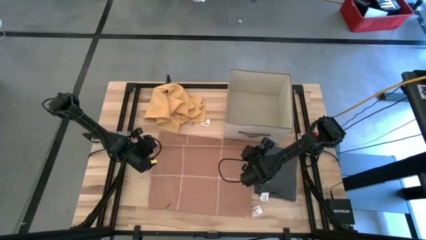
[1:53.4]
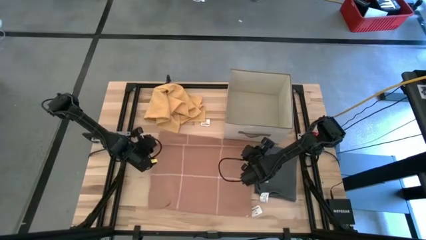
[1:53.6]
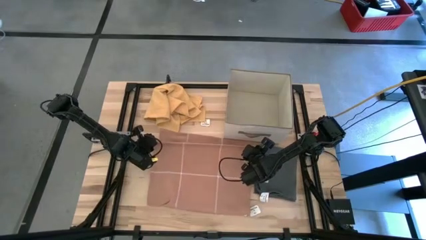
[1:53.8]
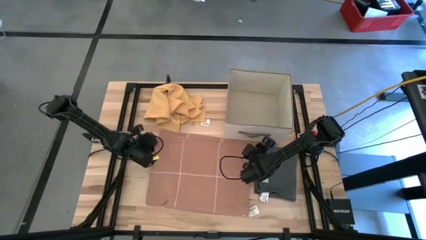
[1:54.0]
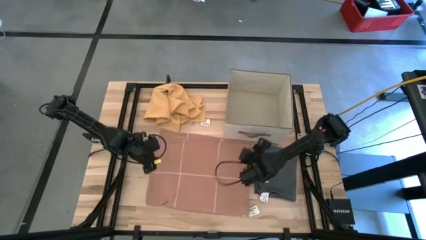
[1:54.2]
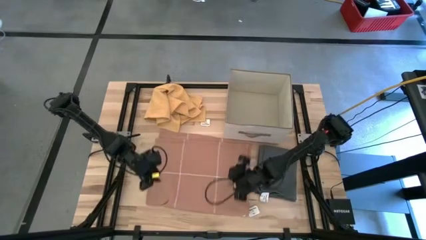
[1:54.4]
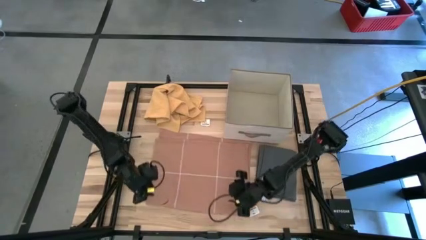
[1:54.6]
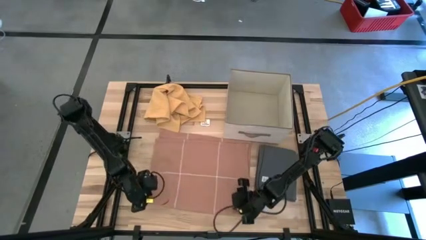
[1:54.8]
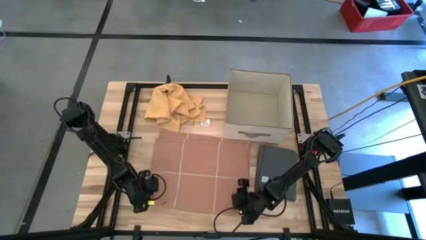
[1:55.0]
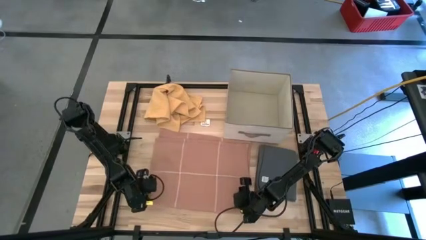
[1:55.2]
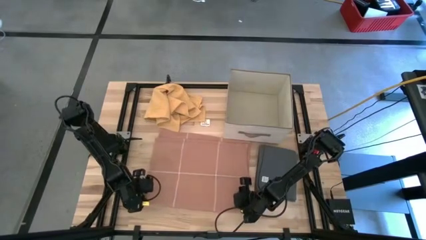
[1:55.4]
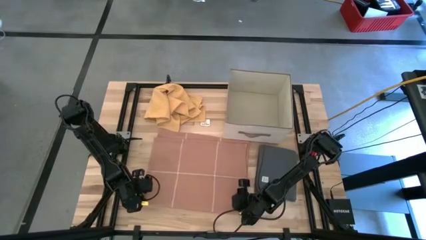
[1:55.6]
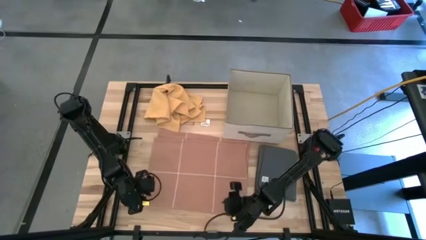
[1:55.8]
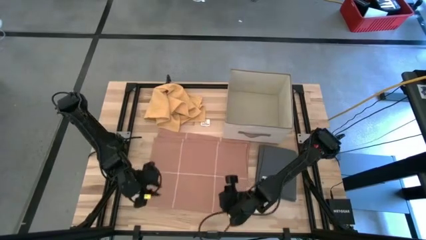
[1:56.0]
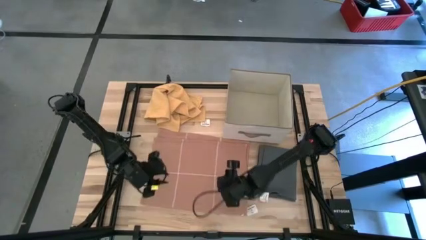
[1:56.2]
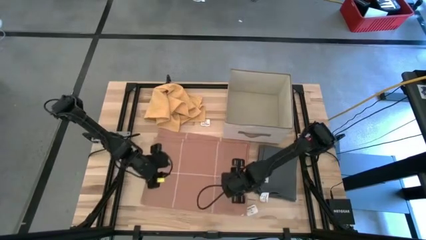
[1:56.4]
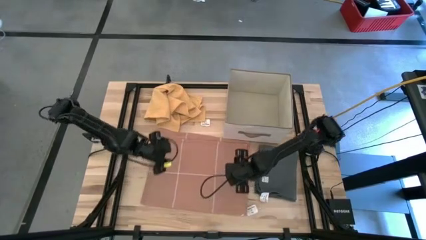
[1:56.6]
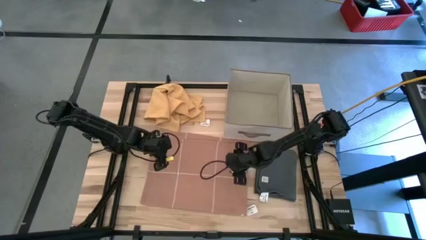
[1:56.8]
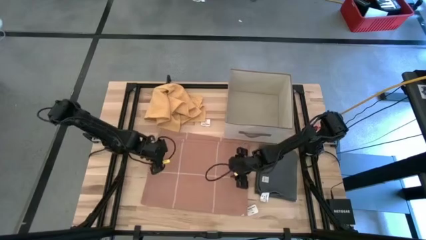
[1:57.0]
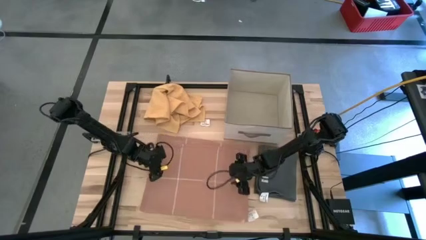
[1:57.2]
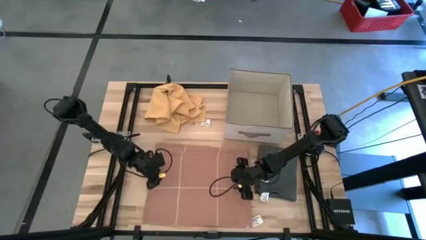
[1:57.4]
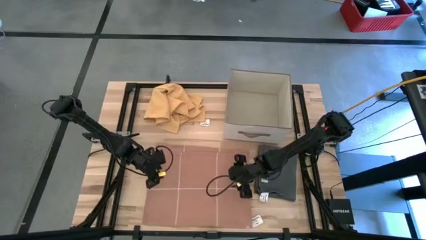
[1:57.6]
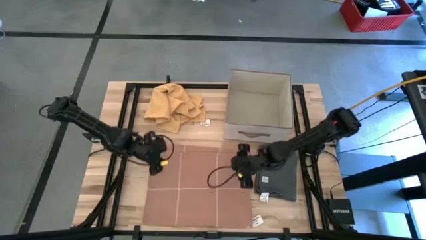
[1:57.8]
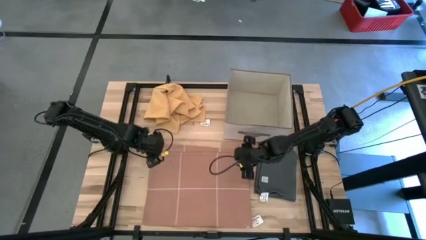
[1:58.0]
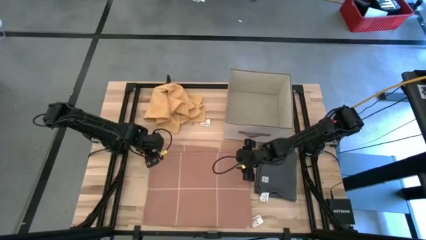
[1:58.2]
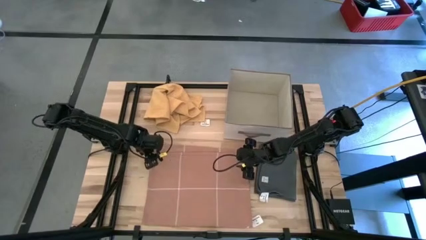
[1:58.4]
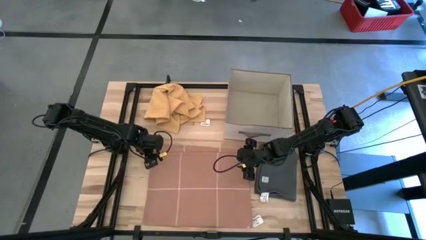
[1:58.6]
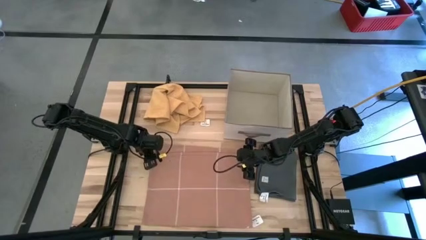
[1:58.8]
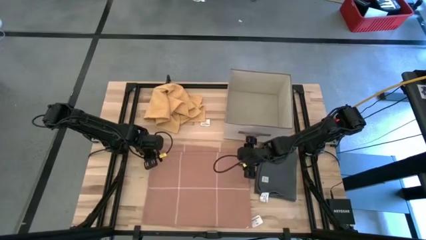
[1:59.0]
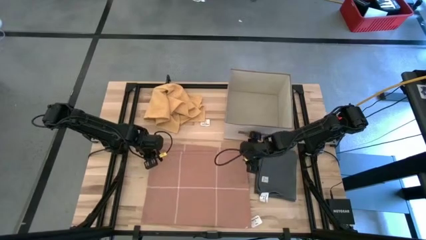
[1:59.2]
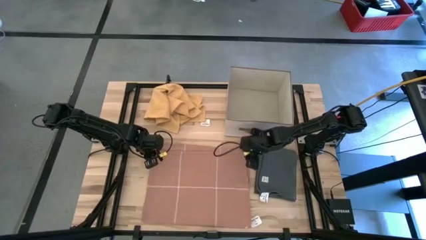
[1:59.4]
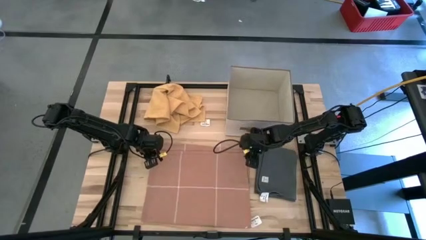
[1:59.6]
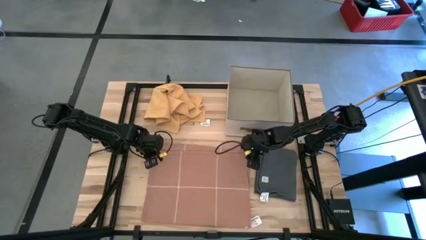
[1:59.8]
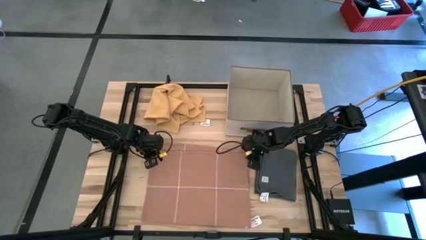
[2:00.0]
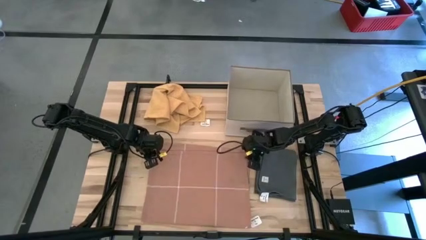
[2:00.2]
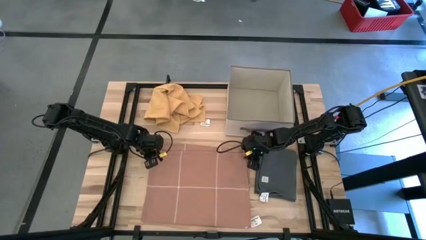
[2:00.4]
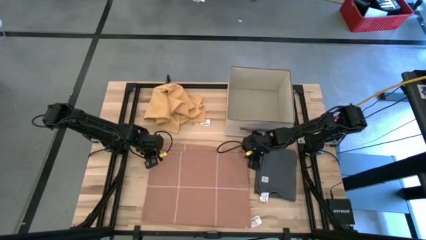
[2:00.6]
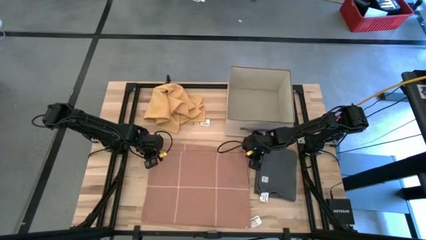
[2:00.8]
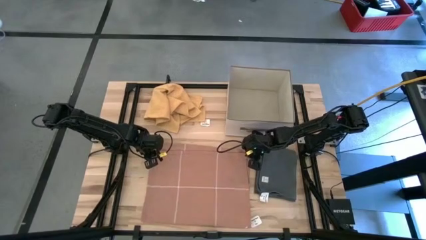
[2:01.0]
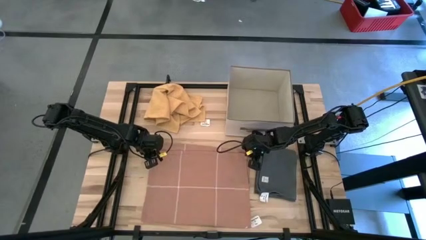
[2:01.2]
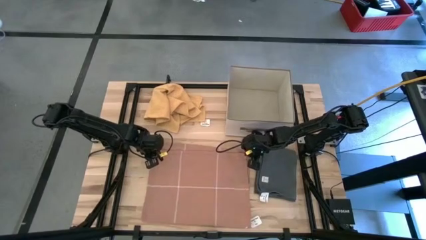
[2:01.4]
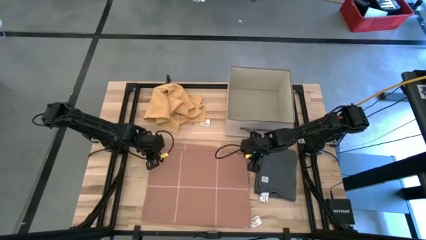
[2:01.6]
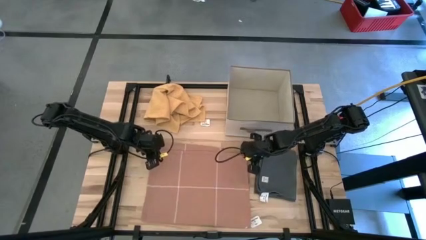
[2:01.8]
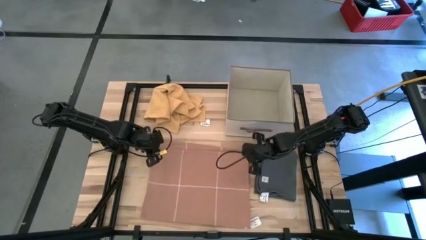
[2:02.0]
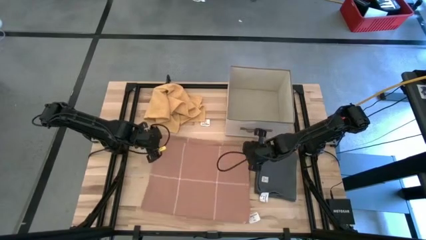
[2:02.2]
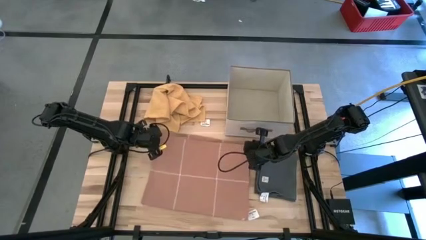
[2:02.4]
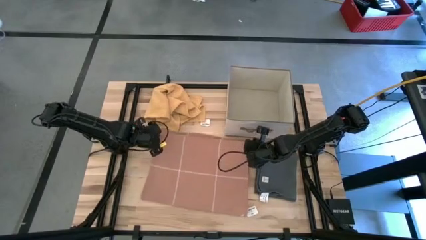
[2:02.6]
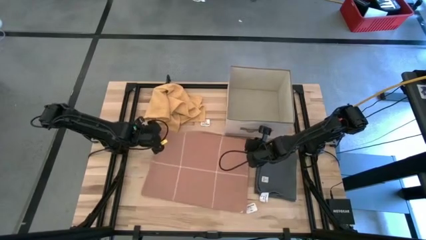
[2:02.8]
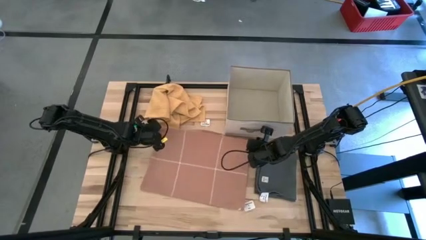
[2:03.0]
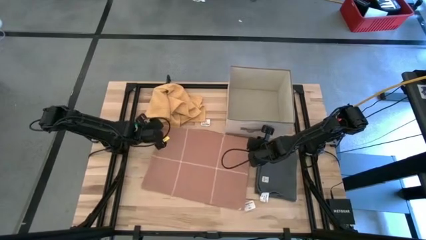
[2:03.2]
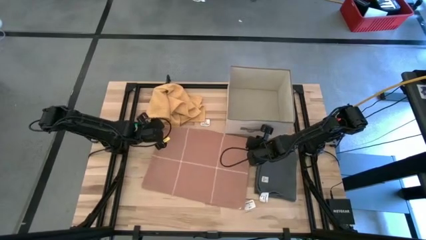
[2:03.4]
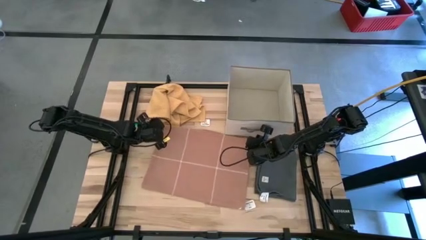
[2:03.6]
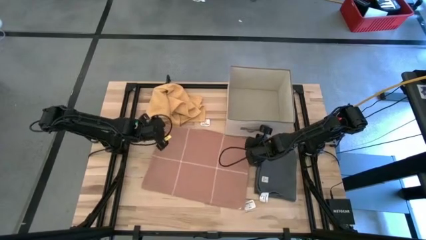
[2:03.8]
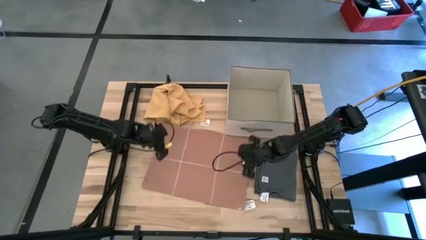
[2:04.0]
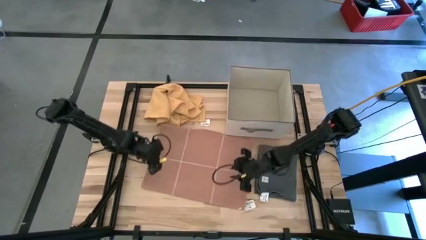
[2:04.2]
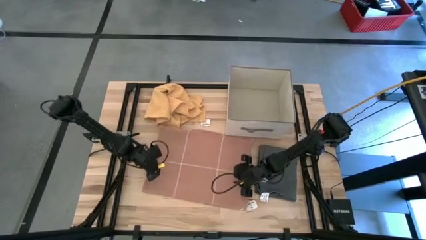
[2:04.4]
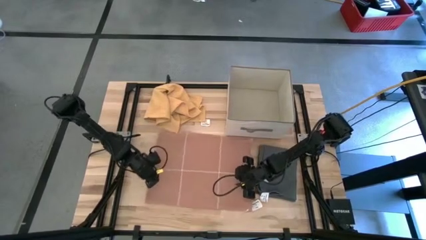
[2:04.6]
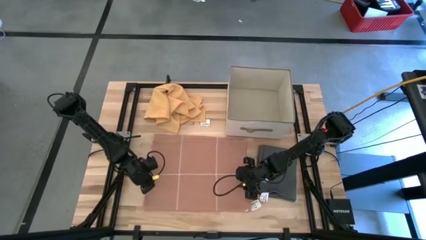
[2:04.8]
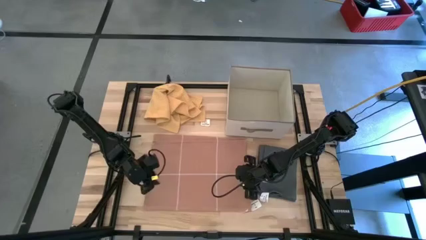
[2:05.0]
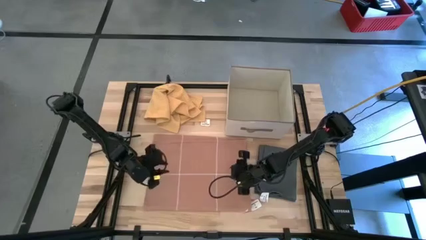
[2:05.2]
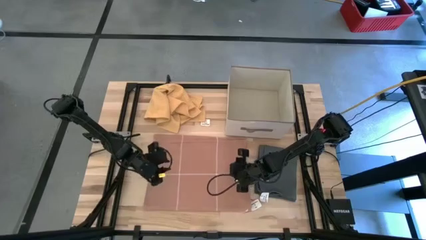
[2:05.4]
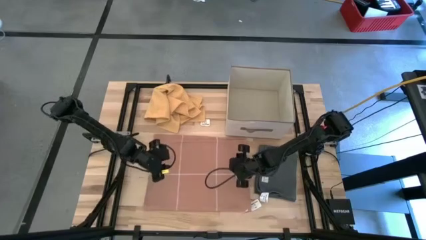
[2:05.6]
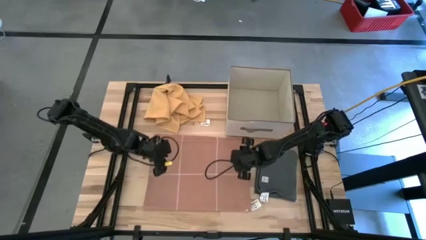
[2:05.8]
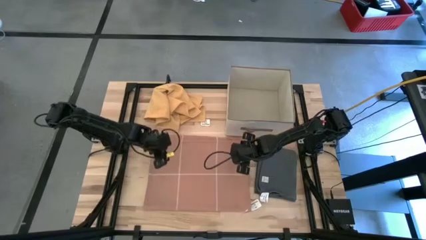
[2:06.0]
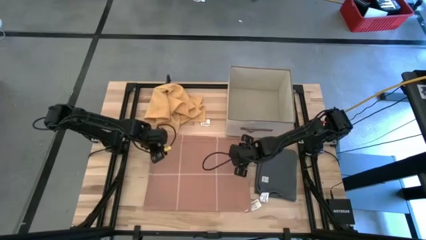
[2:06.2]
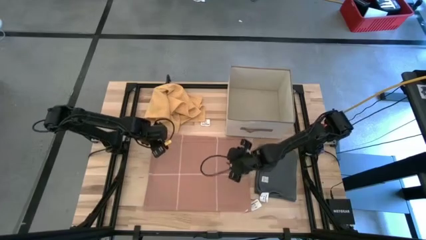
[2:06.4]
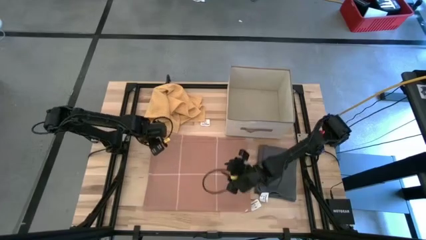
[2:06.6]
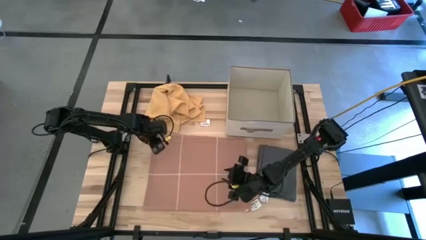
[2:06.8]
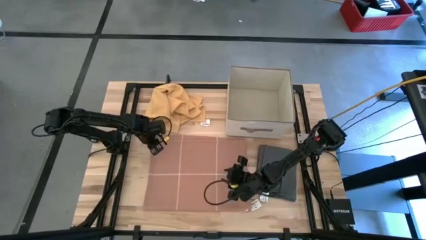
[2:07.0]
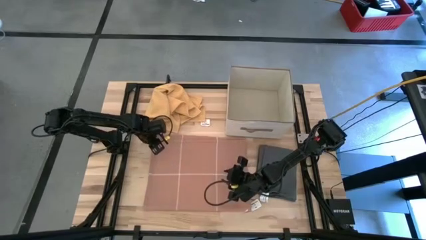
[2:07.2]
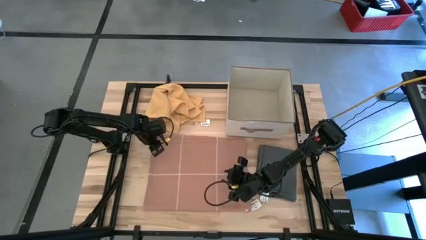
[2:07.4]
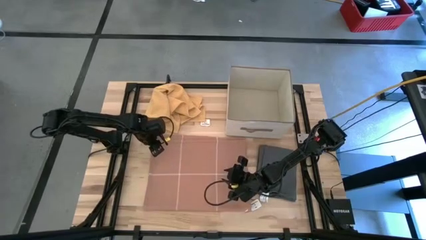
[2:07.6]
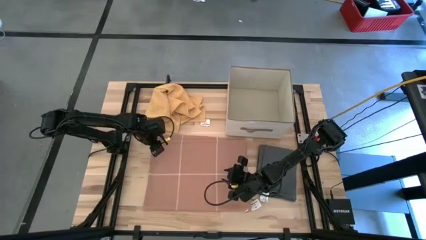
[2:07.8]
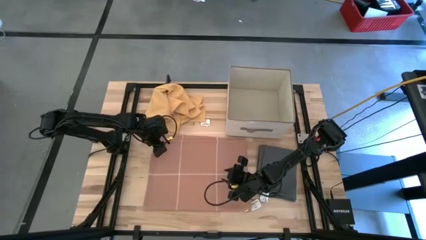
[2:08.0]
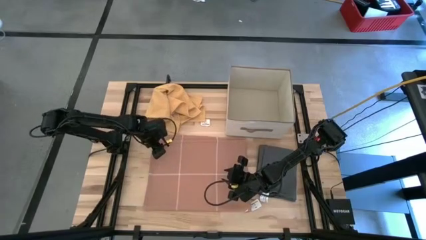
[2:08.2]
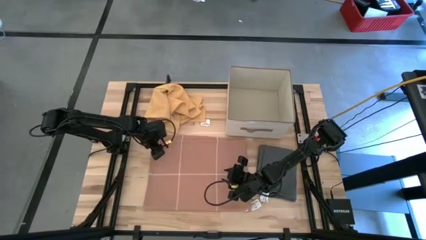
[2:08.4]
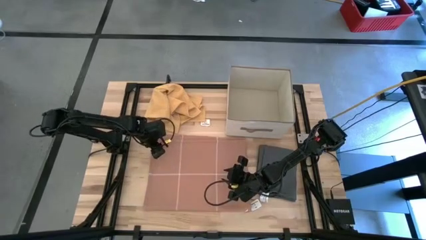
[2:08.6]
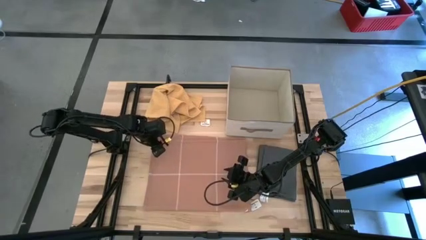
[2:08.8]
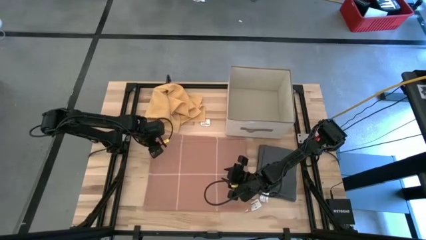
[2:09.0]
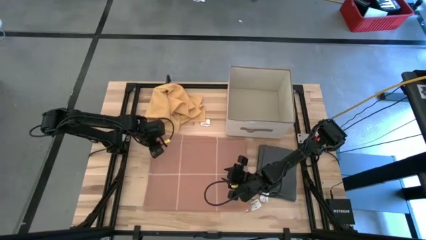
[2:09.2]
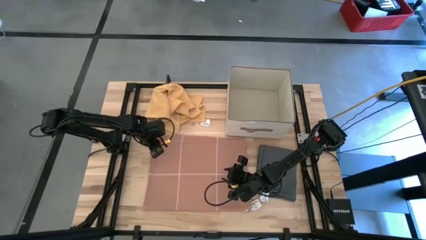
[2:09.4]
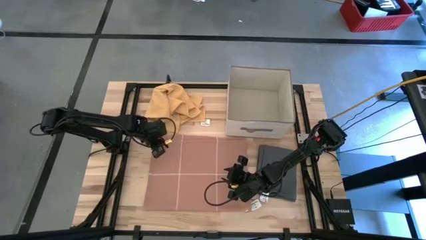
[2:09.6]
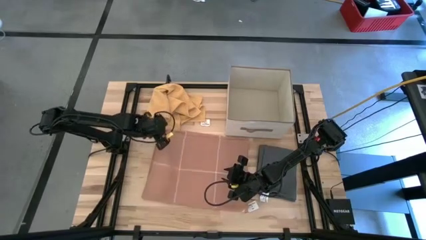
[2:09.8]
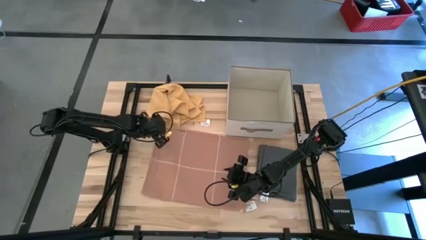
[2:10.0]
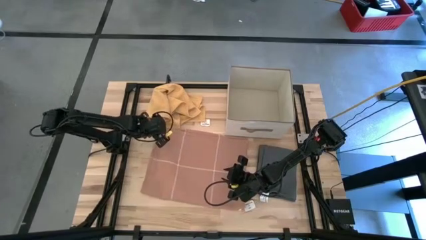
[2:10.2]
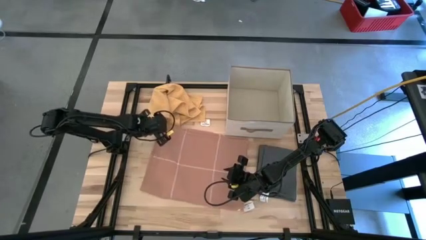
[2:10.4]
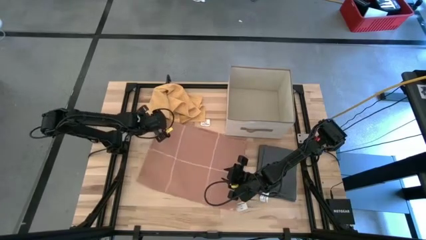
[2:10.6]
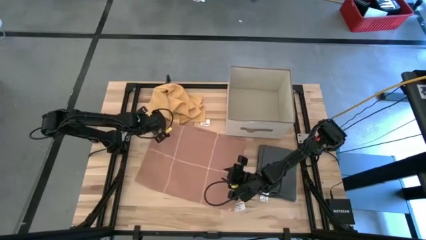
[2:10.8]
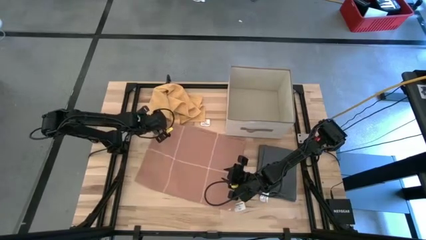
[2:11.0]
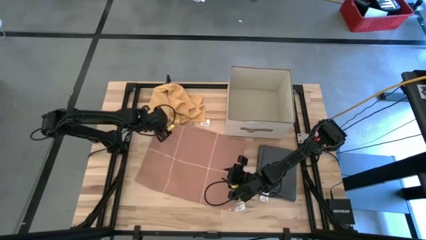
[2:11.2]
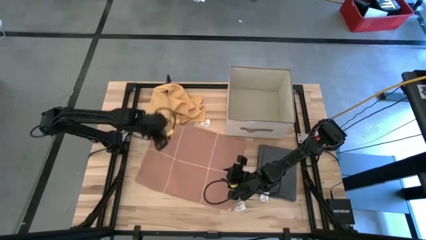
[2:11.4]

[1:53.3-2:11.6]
Task: Fold towel
Fold the light orange towel
